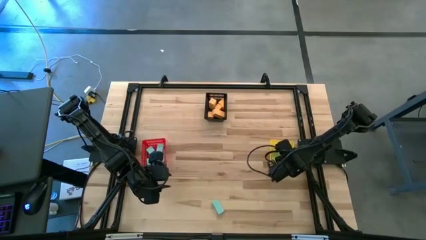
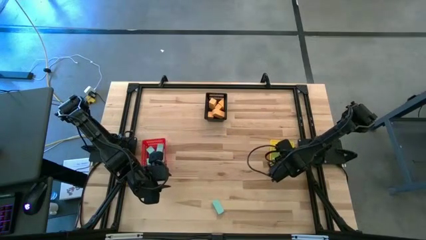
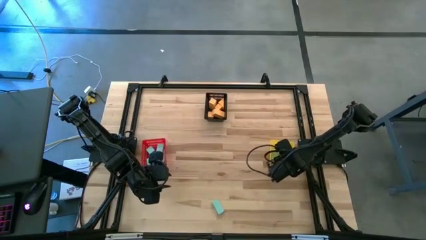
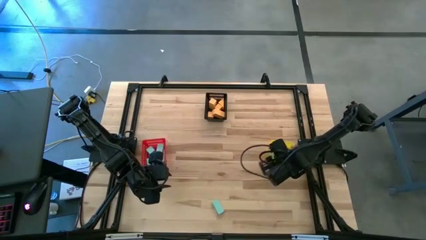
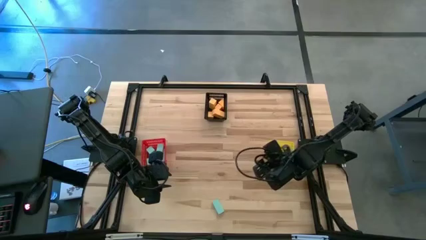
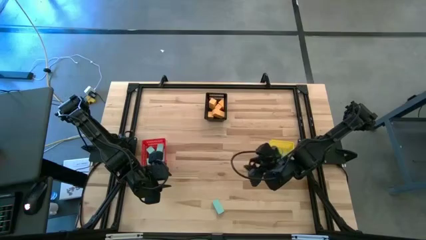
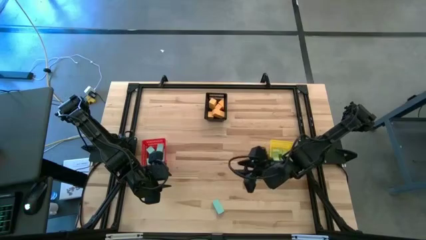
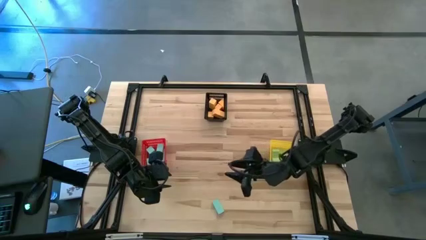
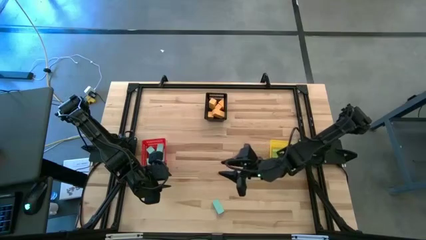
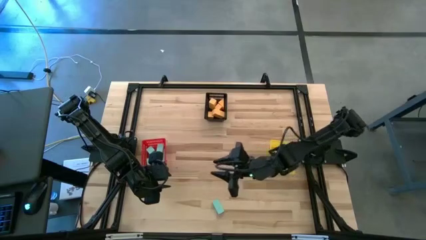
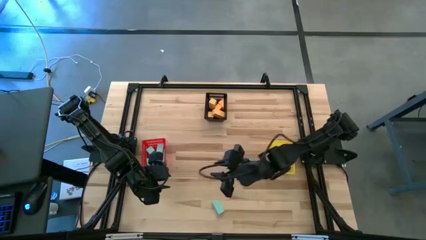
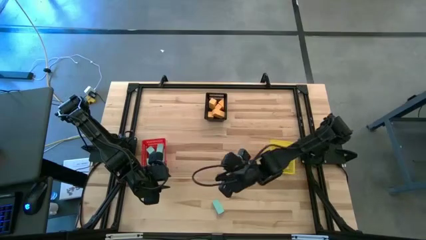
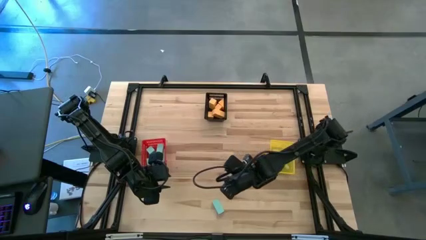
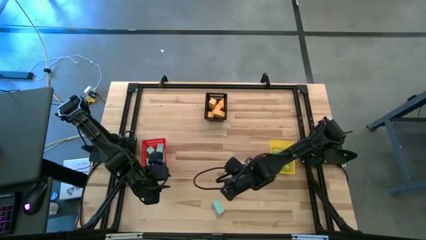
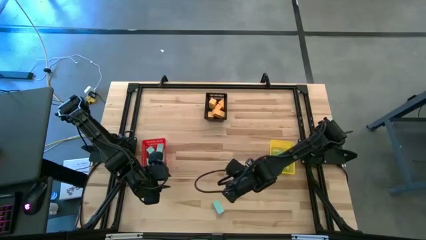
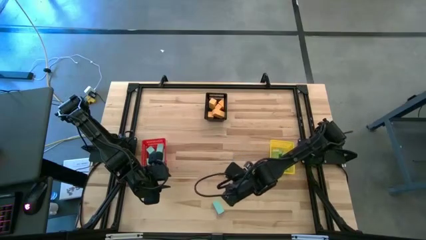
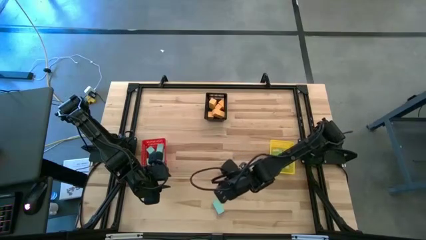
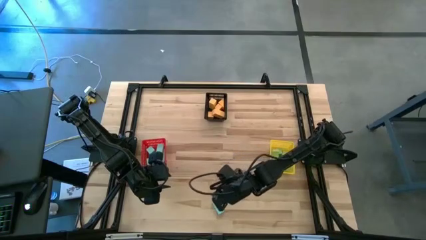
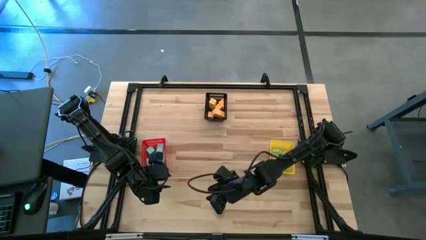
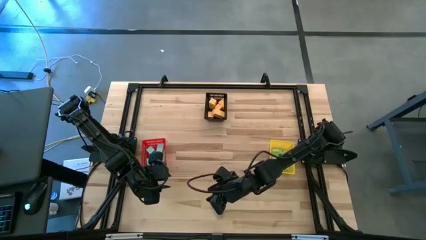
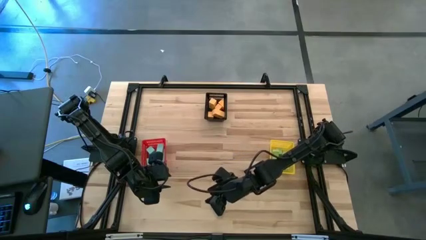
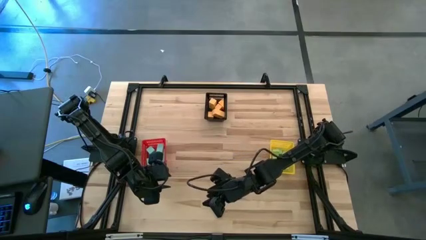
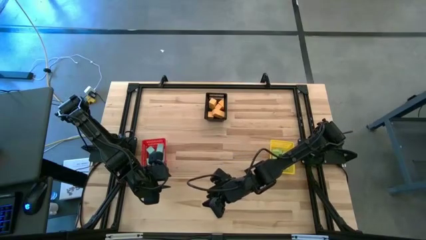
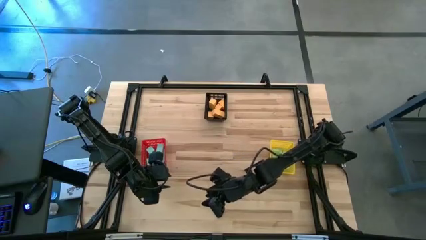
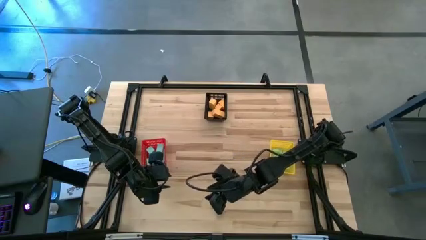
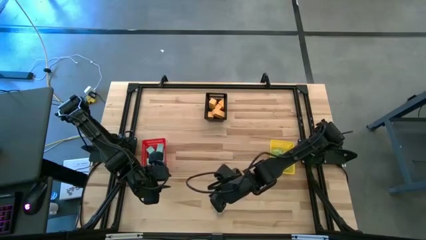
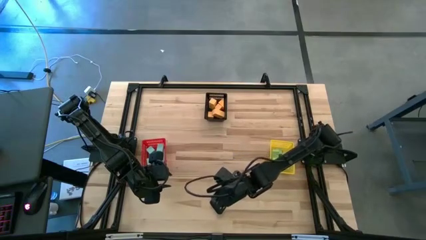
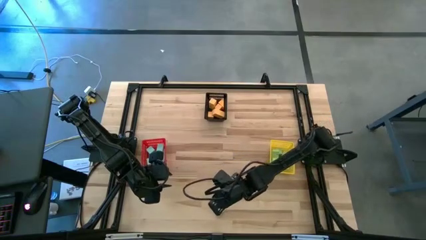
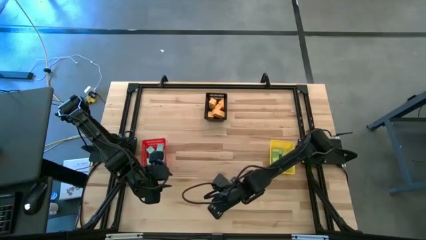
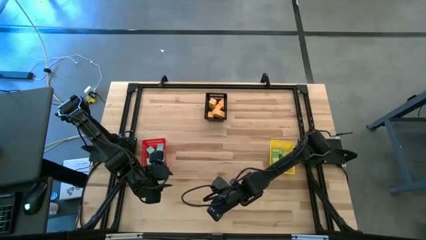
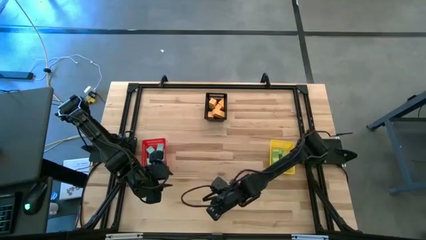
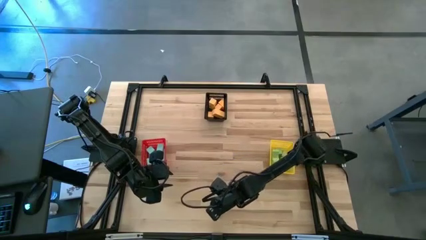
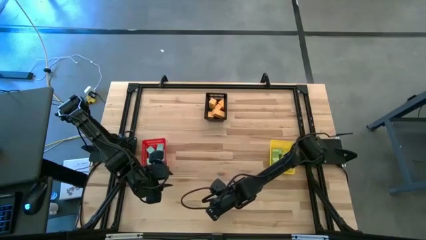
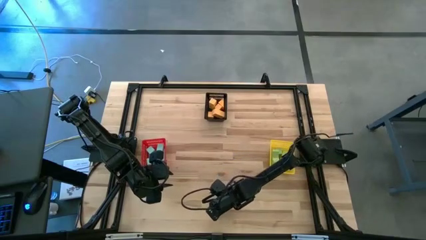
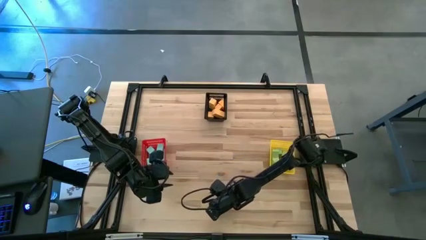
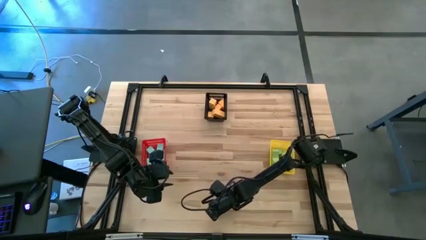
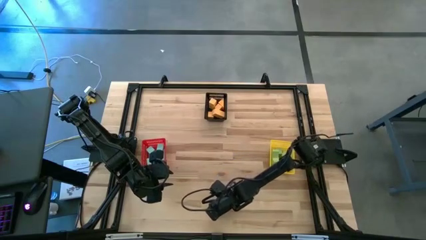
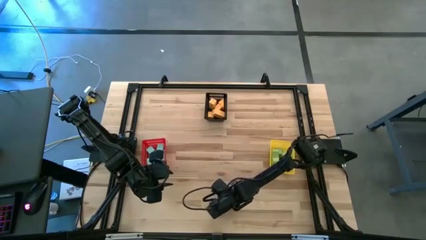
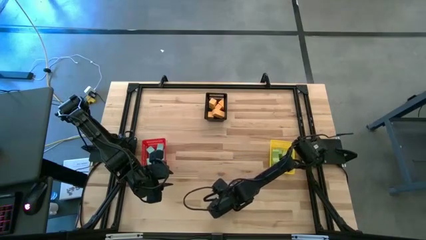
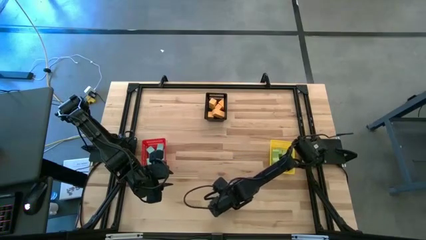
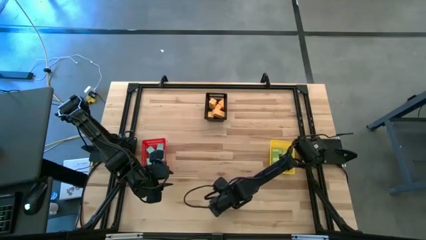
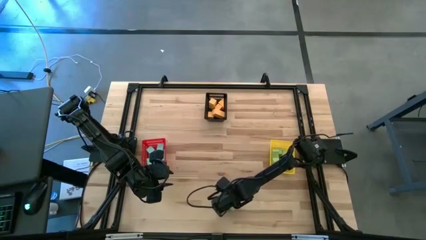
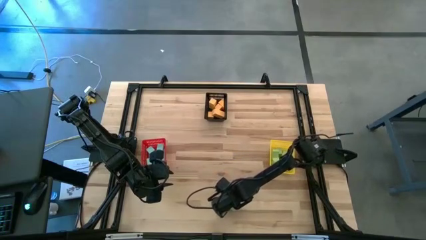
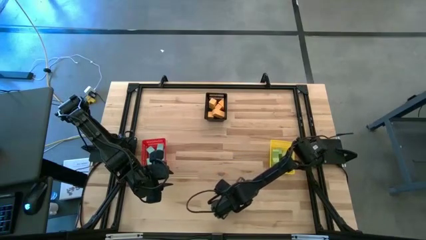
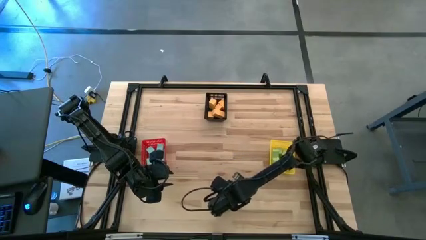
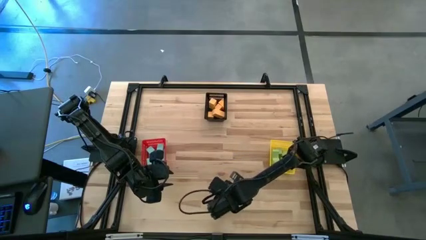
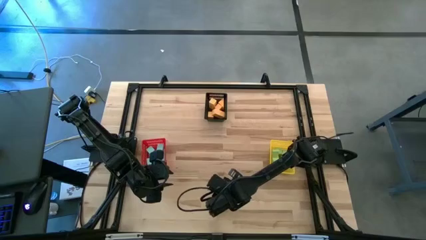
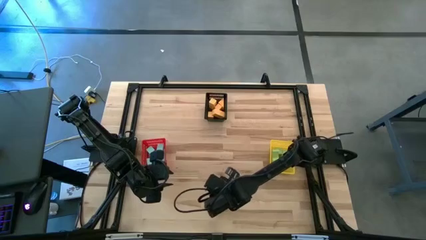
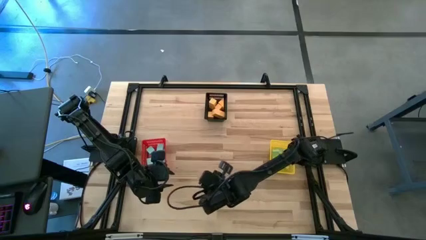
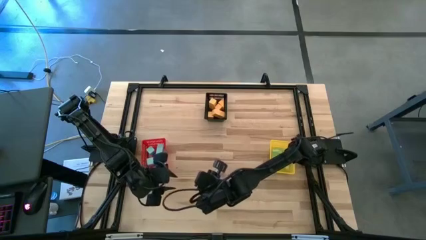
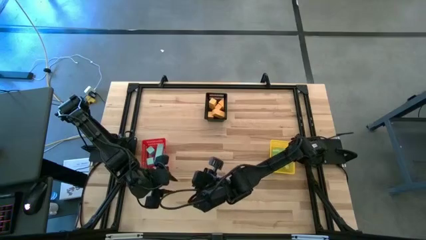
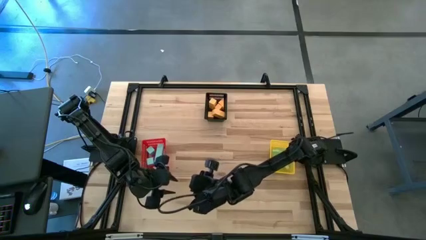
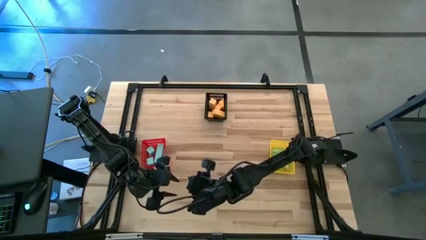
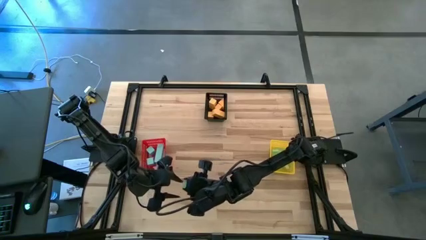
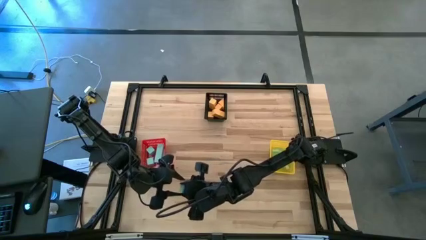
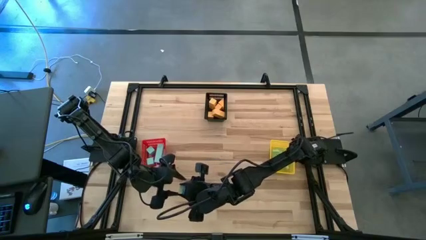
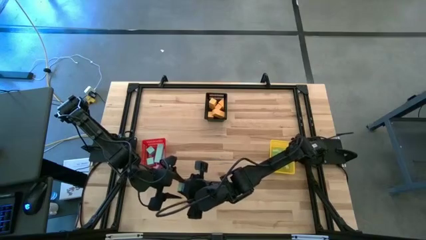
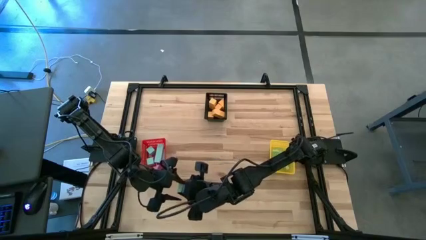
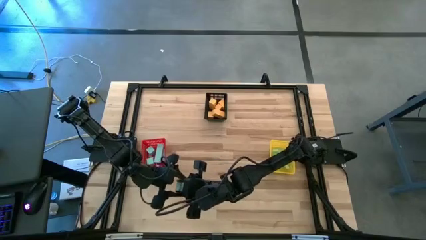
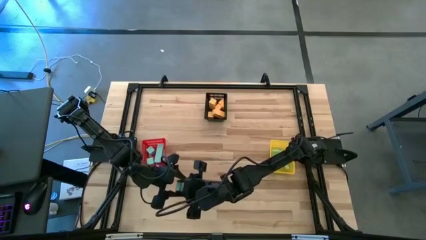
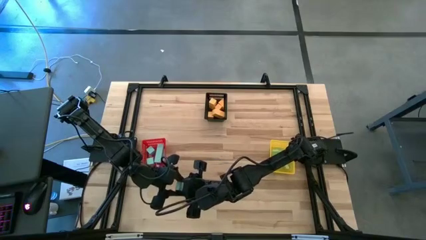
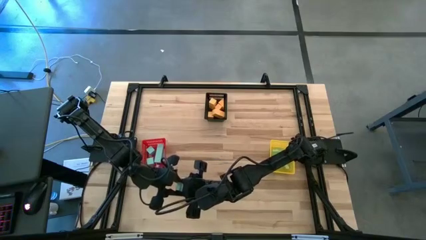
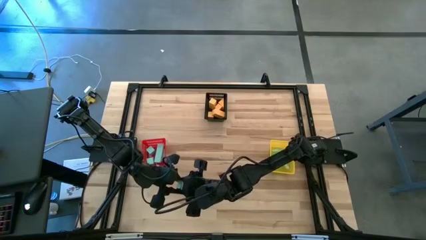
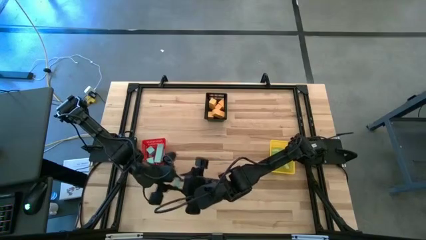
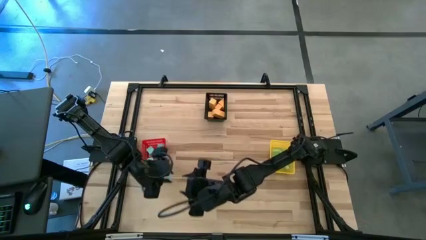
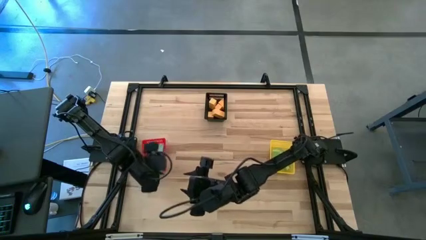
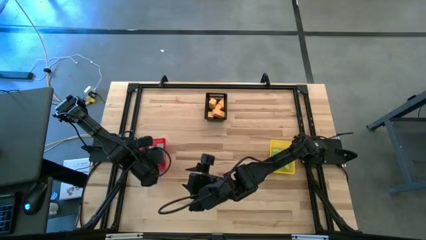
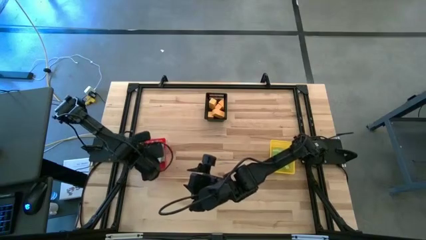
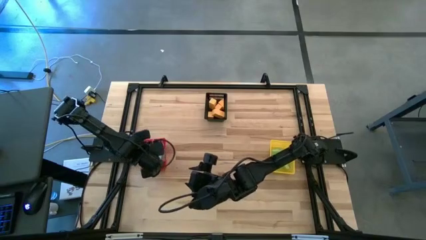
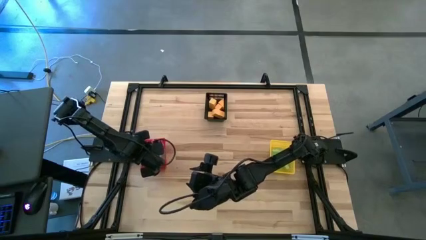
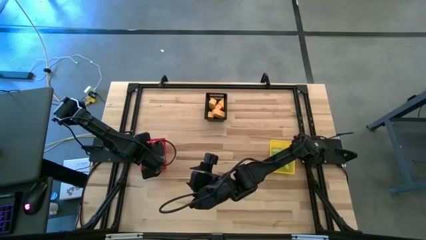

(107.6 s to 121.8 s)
Task: Sort & place blocks by color
Put the blue block into the red bin

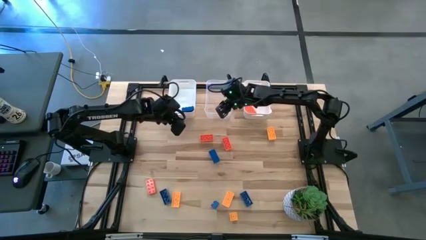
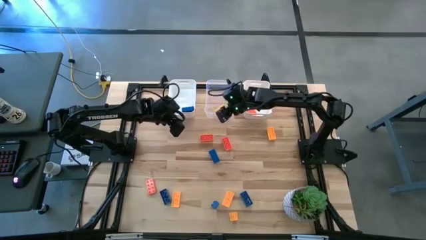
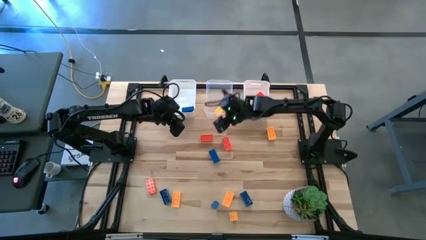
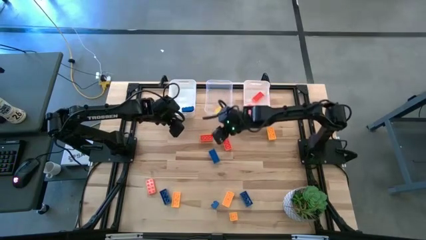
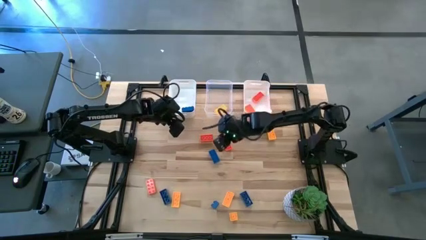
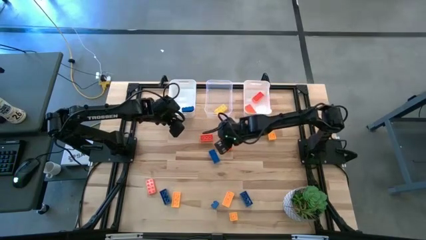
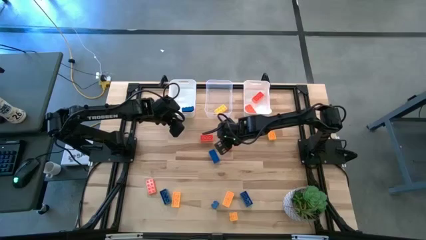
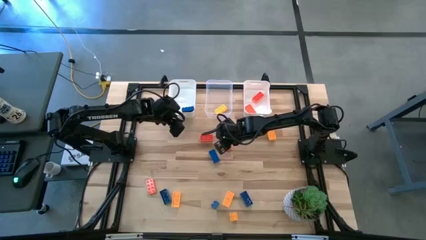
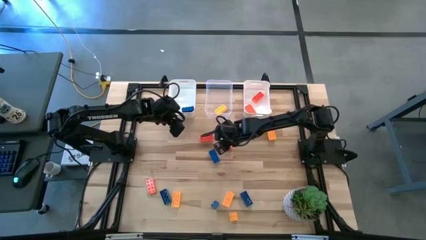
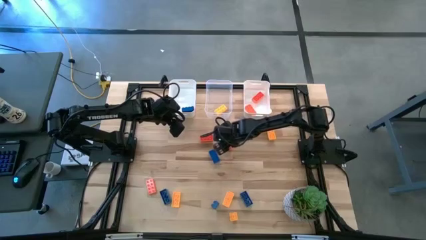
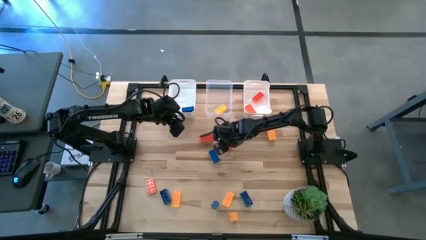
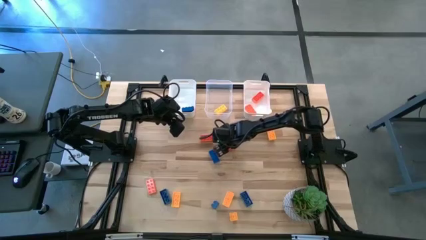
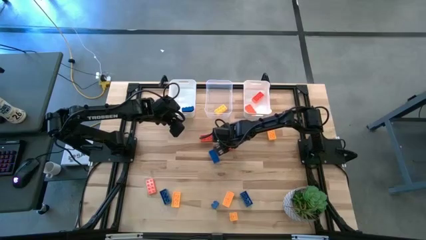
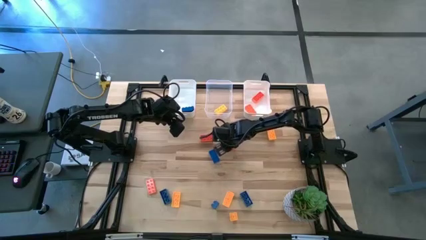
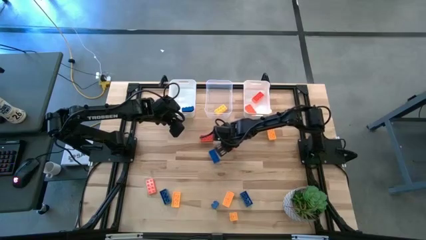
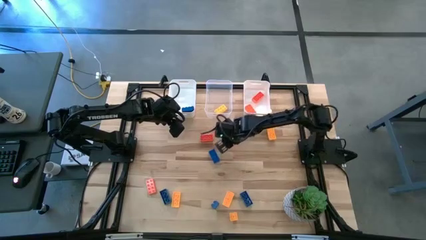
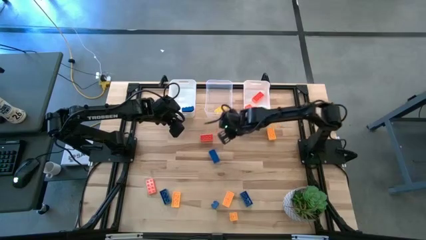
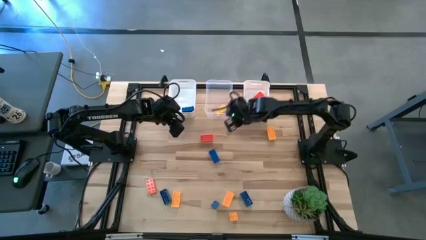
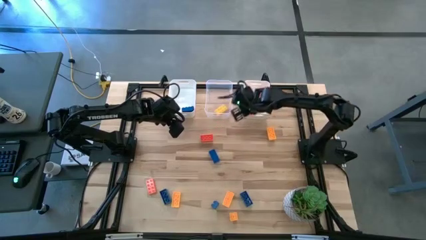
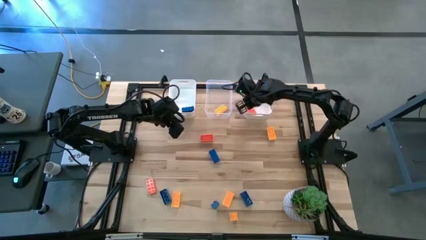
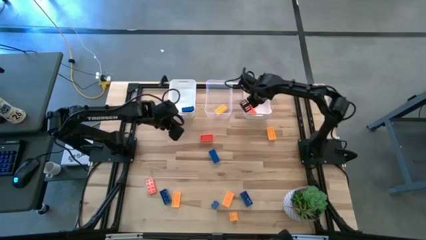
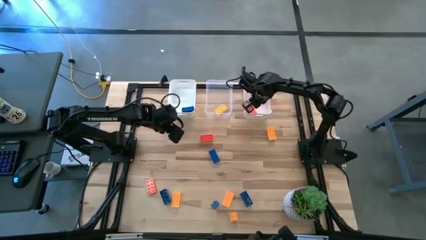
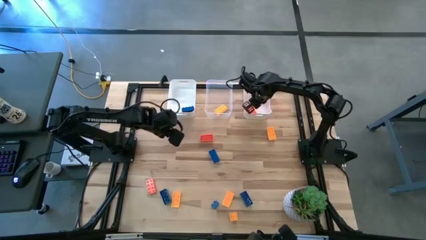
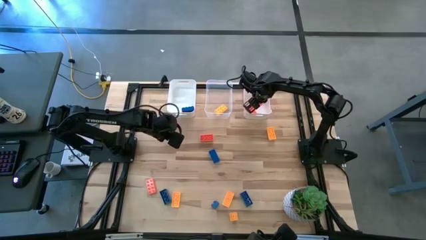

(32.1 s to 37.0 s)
Task: Sort & place blocks by color
Put the orange game piece into the right white bin
